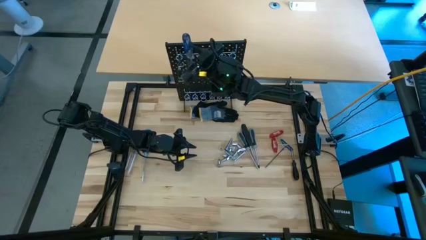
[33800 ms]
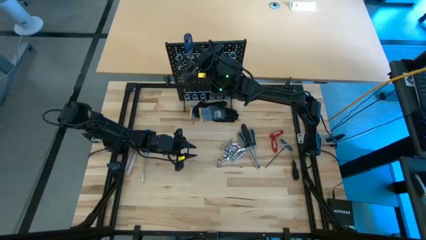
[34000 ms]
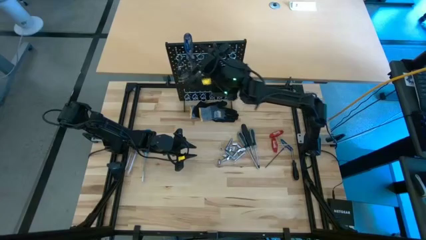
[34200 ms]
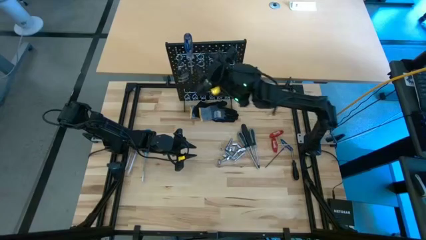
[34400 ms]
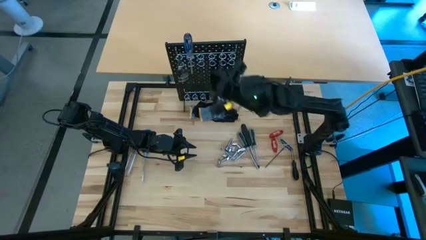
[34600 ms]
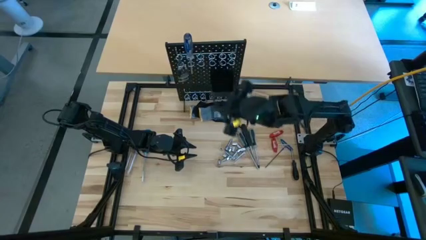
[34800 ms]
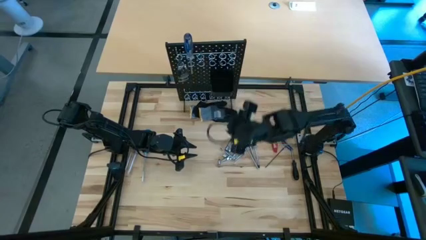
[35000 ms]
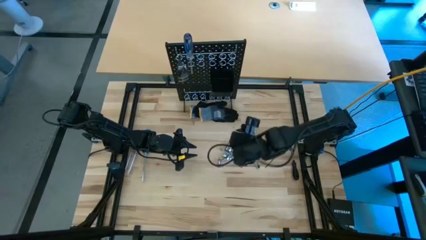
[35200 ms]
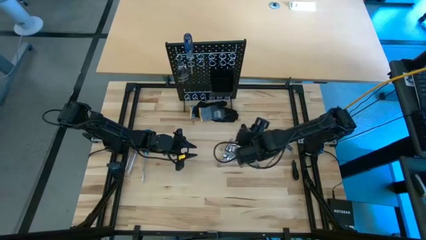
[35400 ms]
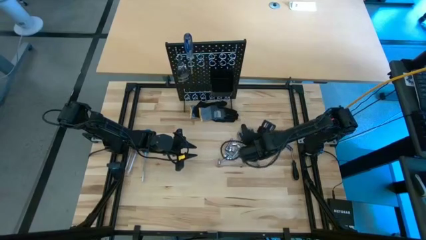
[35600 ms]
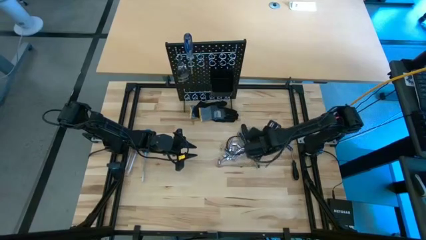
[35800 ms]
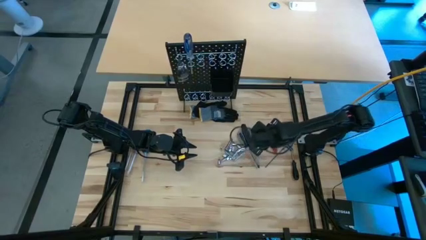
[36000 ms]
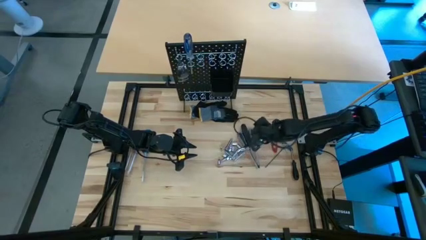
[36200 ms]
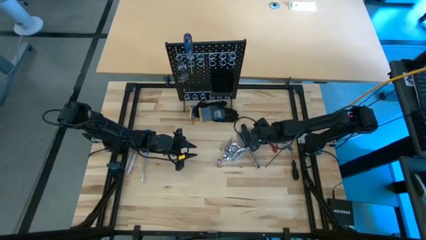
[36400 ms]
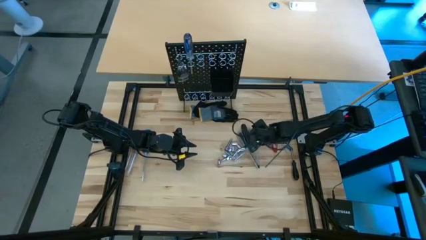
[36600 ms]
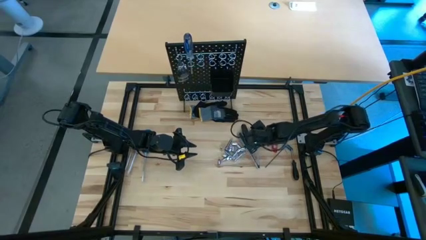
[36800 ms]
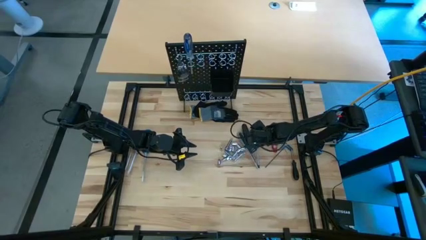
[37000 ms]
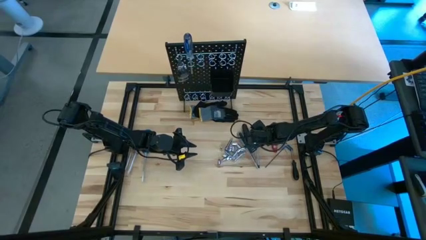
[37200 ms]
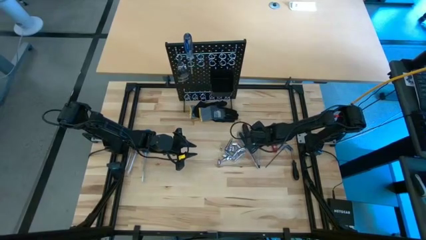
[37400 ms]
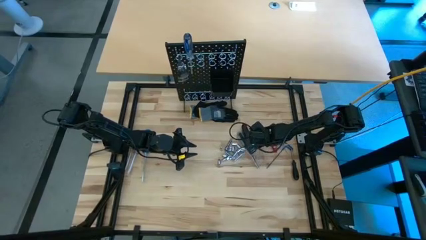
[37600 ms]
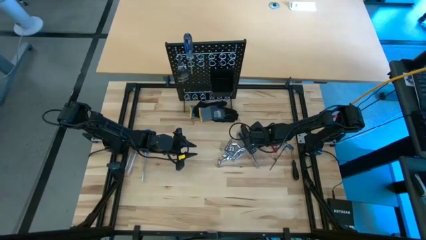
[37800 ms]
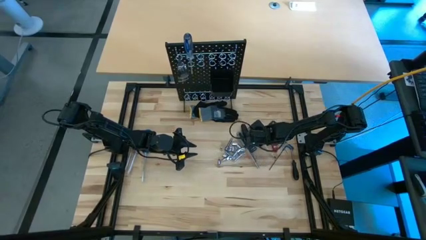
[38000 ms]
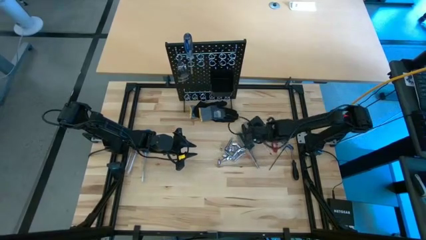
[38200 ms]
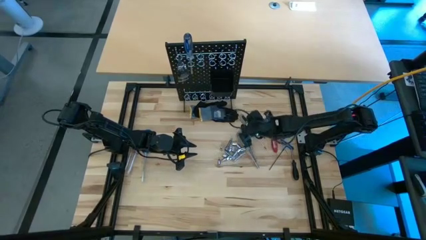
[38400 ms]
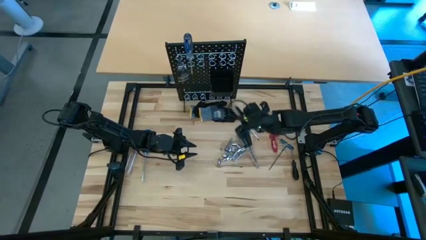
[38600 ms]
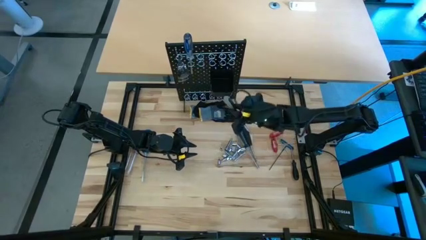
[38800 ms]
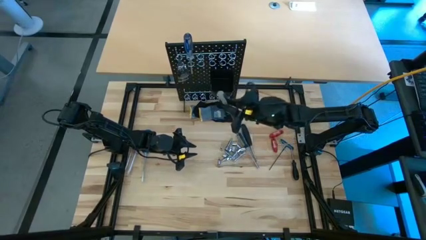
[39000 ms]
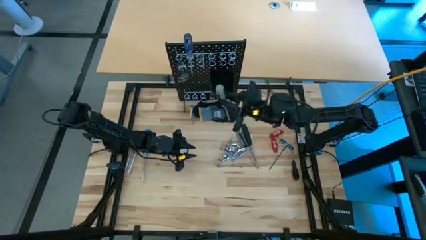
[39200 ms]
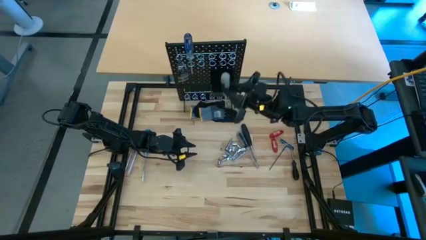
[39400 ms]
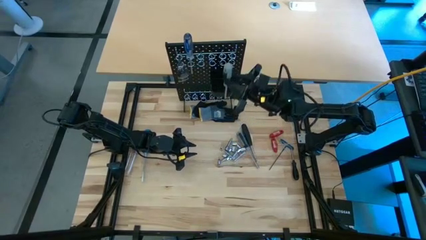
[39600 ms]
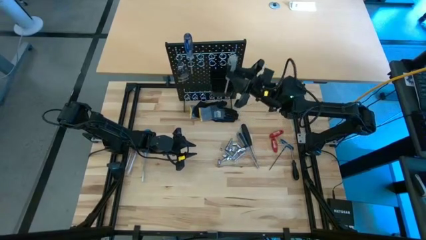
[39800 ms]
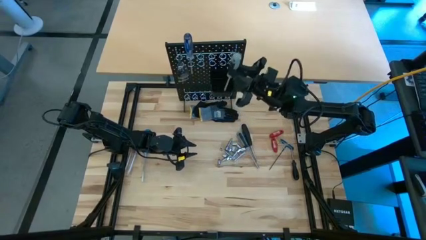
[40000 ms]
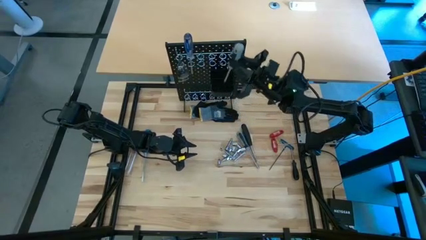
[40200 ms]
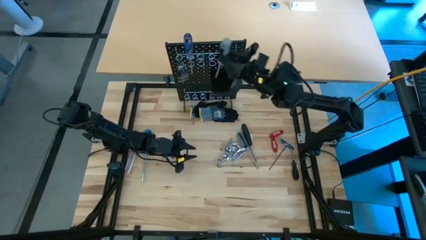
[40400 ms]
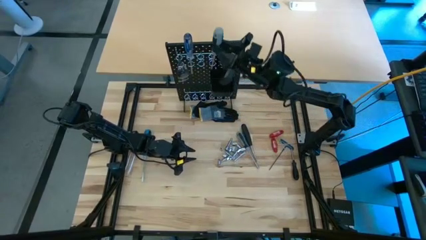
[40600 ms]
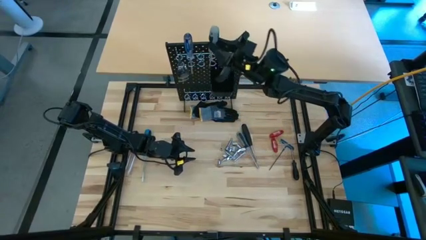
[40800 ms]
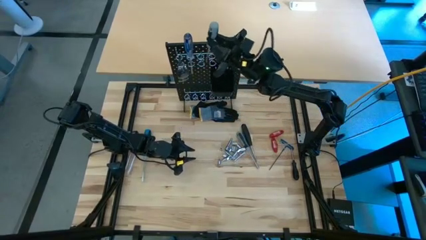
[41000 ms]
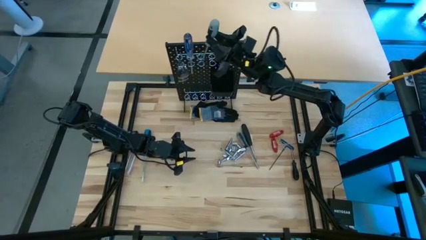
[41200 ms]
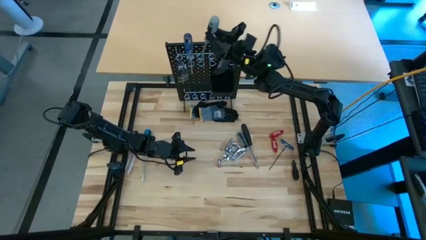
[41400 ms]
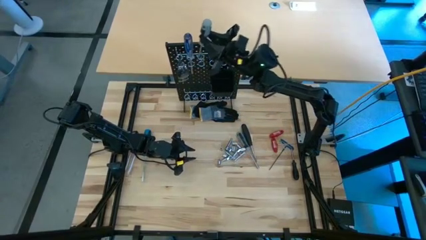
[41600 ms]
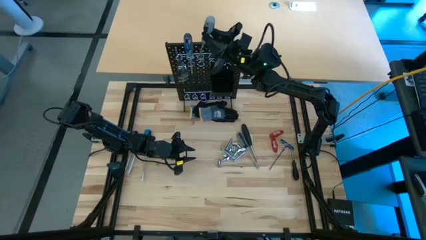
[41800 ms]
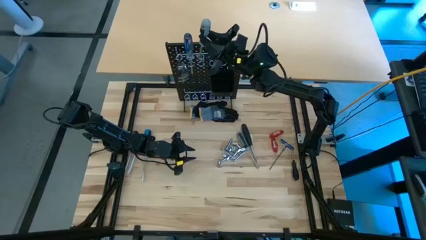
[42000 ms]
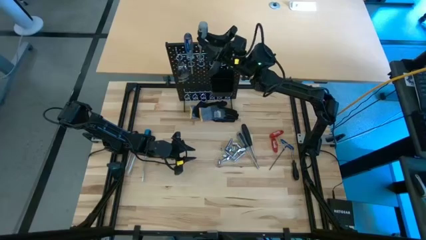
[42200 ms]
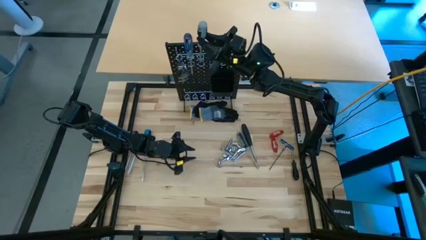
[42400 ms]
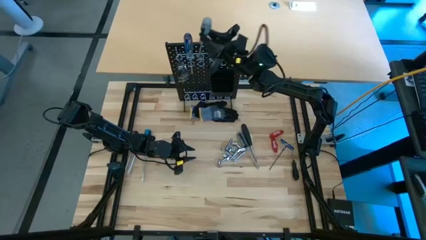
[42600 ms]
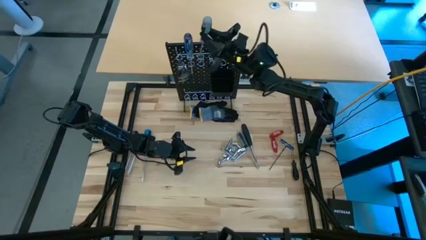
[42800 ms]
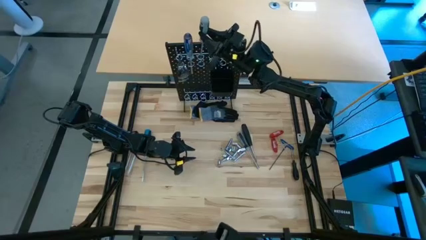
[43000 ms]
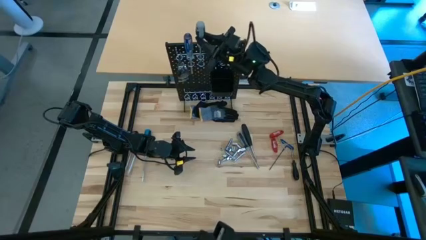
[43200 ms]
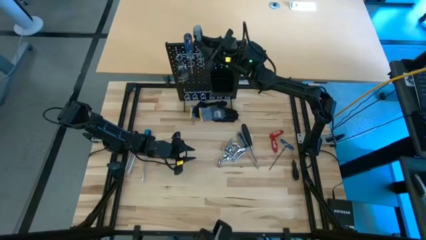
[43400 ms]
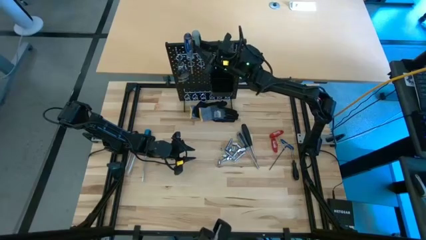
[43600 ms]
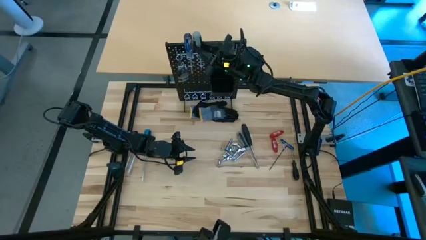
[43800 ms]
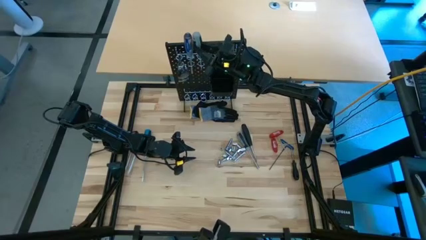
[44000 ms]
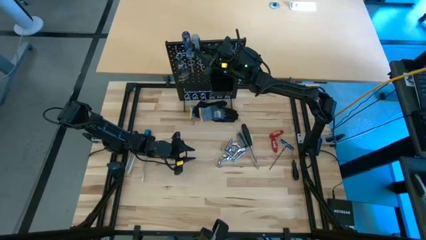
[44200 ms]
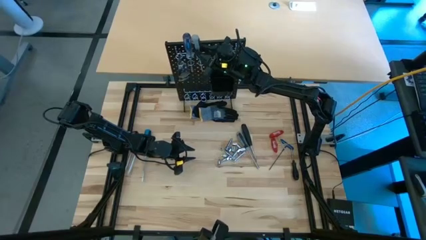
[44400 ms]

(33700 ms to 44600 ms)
Task: Hang tools onto peg board
Hang the right gray screwdriver on the pegboard

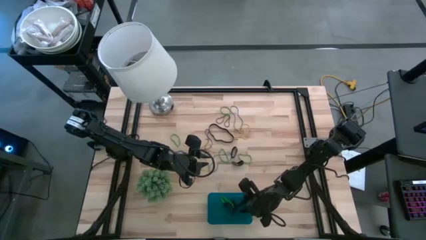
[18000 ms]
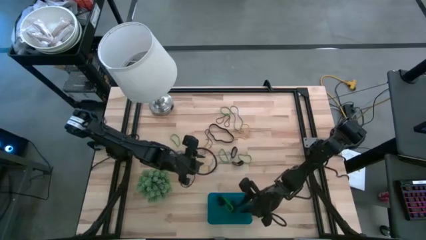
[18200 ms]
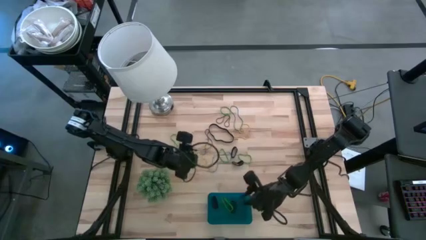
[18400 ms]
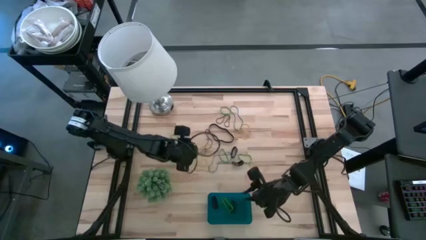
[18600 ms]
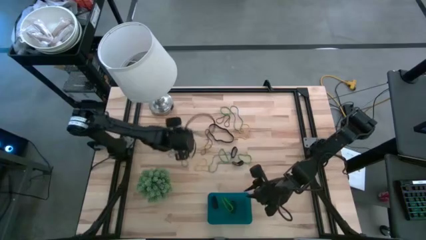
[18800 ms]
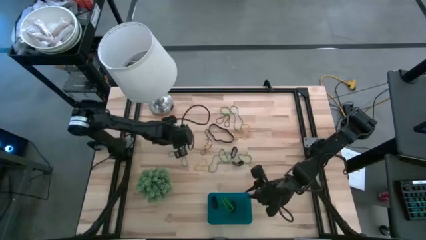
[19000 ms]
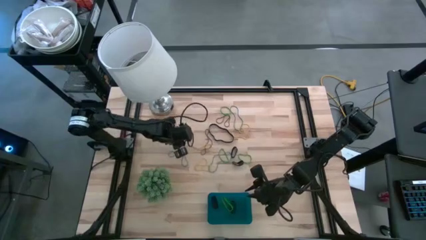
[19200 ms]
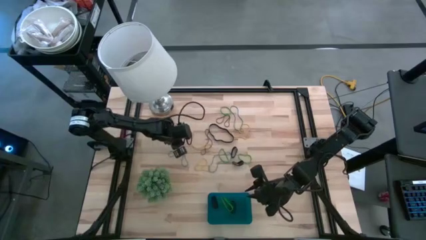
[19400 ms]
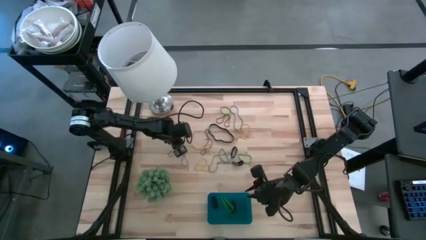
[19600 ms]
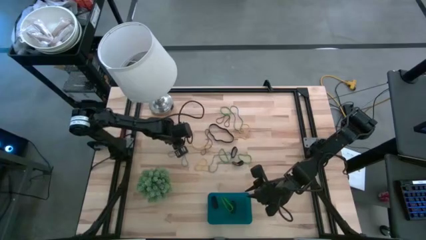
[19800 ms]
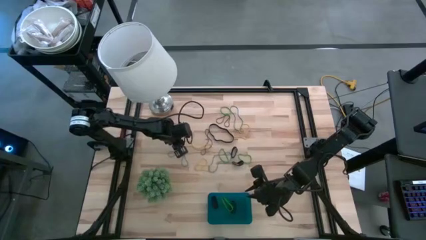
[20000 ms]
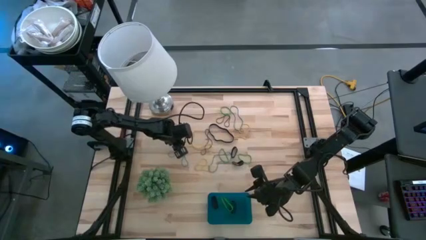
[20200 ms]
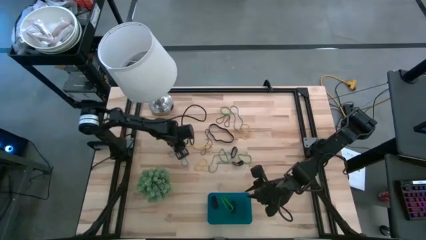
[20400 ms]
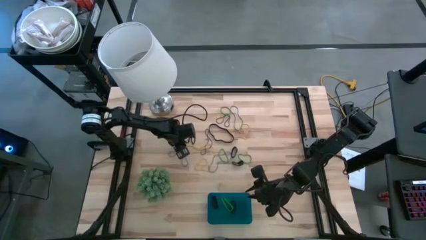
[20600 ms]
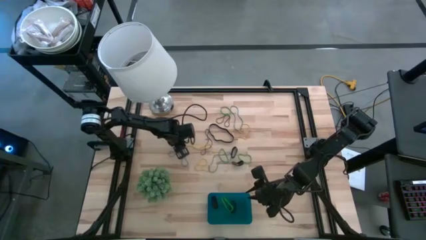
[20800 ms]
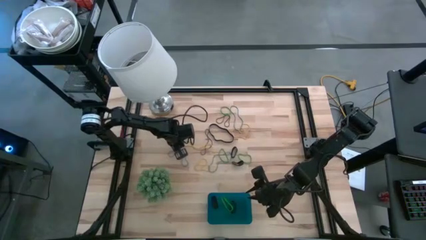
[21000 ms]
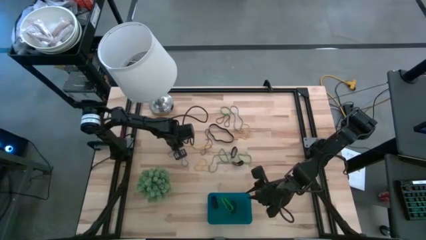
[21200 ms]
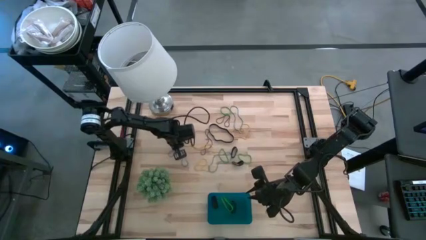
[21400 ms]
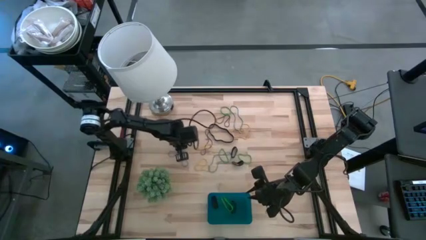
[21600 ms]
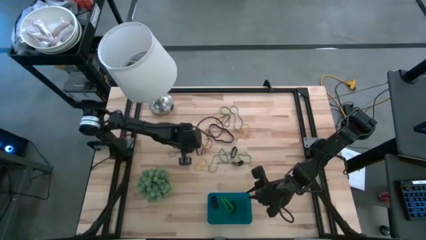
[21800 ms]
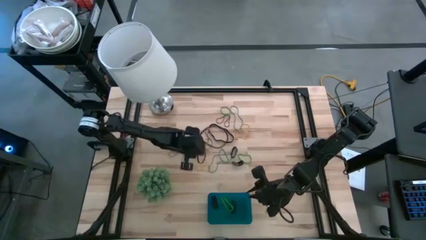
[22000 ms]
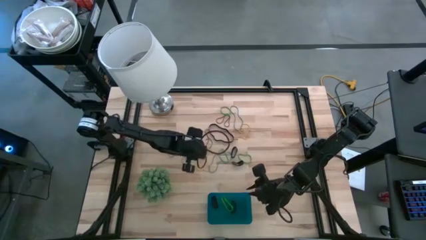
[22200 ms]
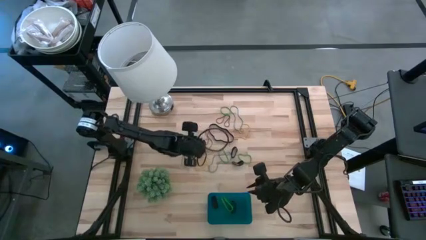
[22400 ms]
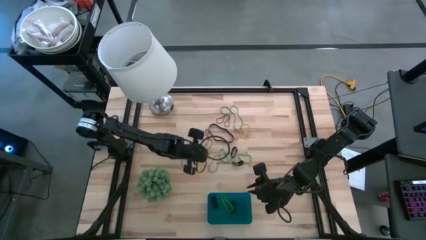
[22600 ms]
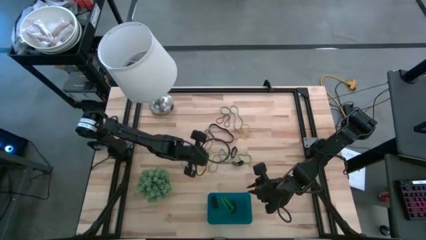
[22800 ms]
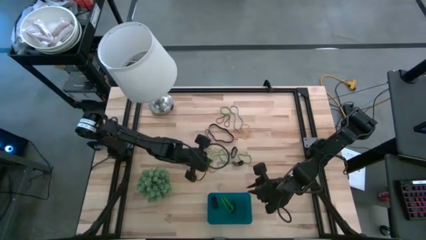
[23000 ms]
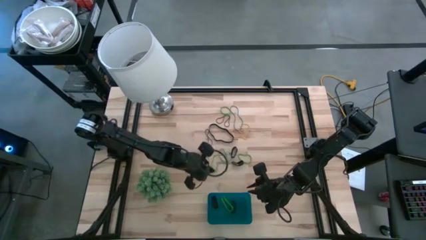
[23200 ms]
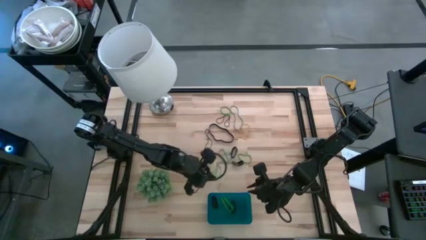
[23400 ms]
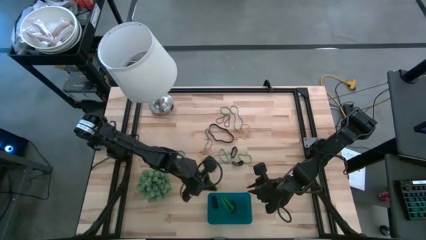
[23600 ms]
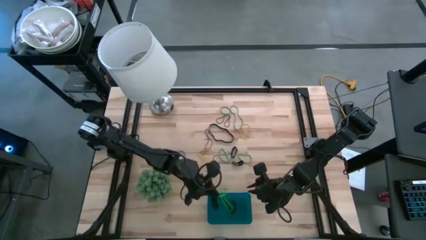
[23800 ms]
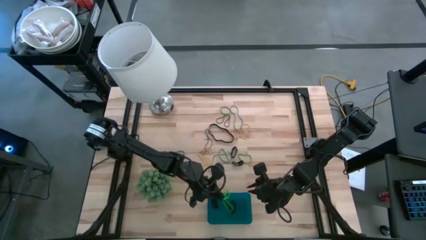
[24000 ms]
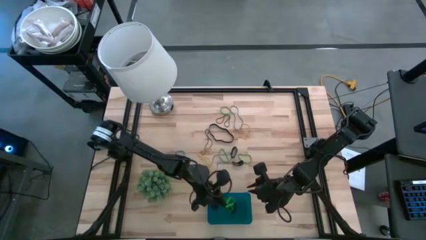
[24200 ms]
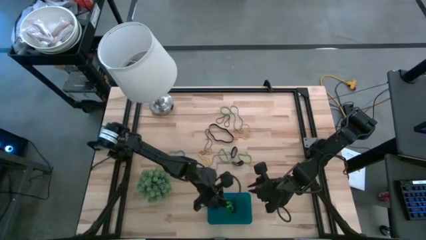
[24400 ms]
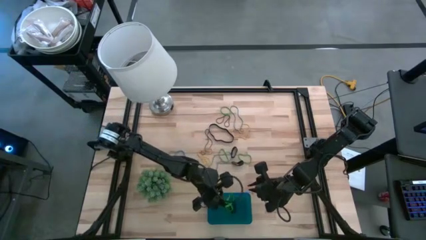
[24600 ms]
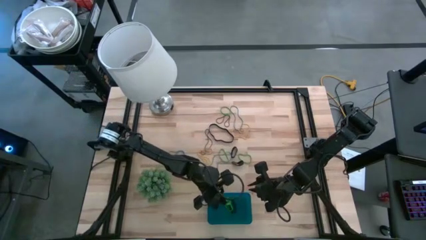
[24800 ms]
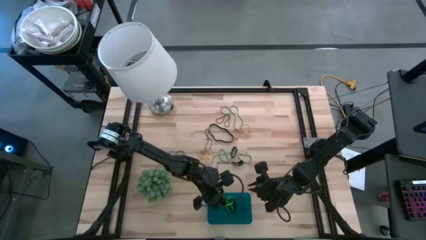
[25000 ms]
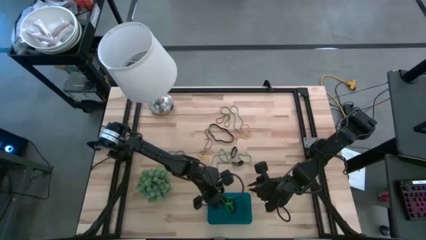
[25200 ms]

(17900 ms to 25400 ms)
Task: Pick and place rubber bands into bin
Put the green rubber band into the blue bin
